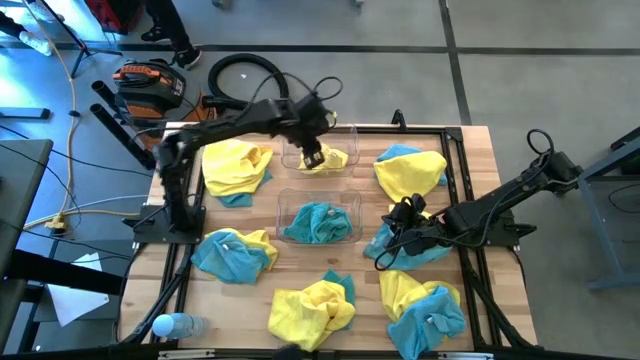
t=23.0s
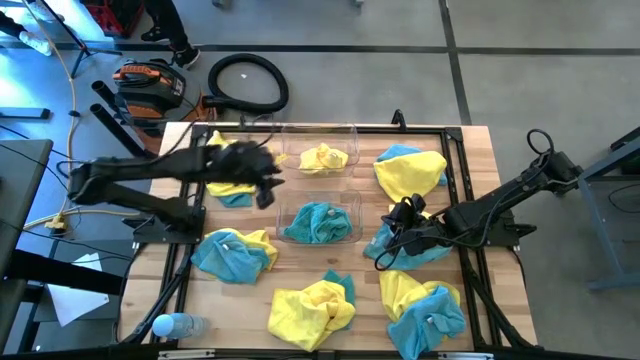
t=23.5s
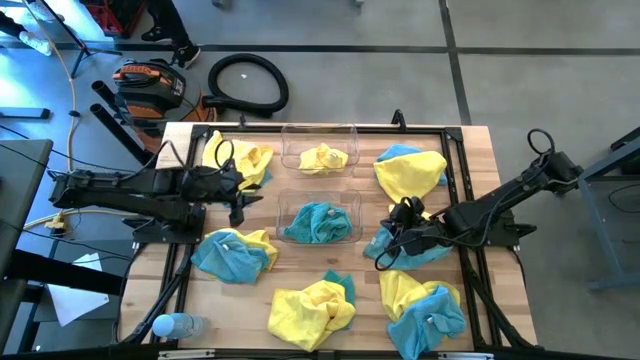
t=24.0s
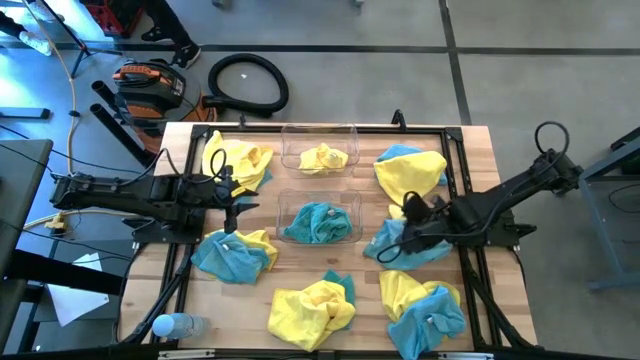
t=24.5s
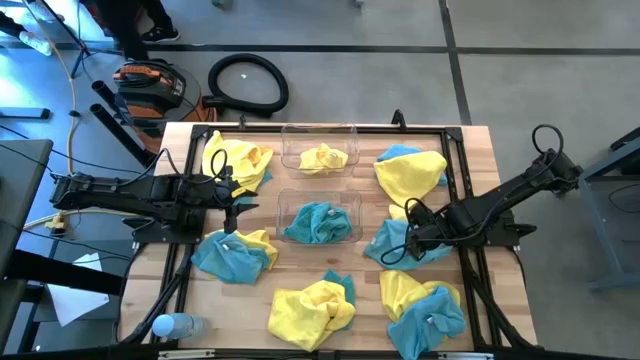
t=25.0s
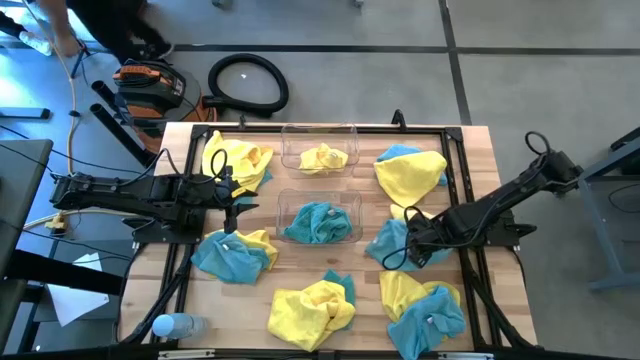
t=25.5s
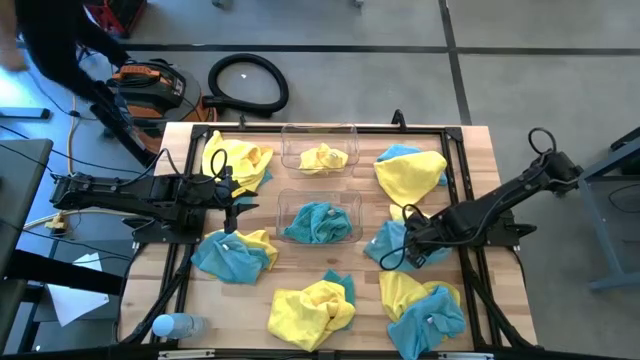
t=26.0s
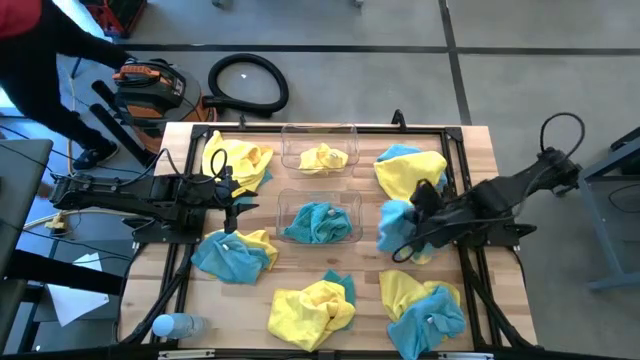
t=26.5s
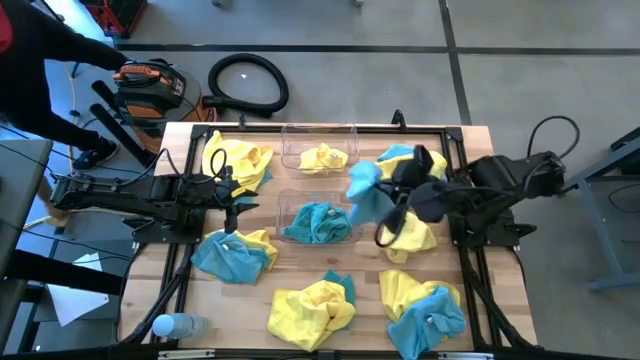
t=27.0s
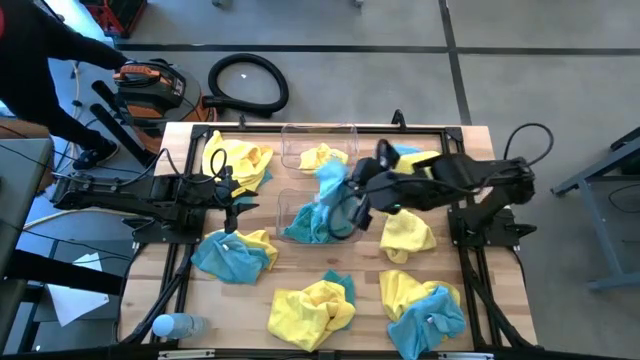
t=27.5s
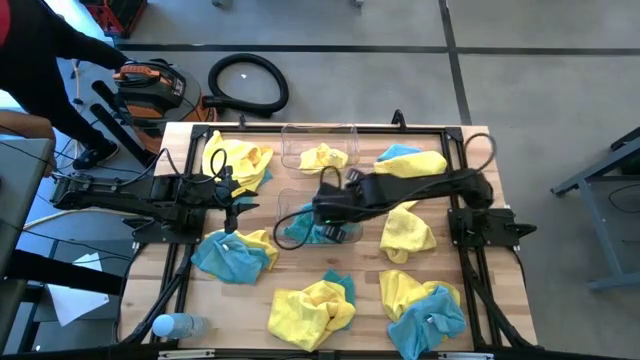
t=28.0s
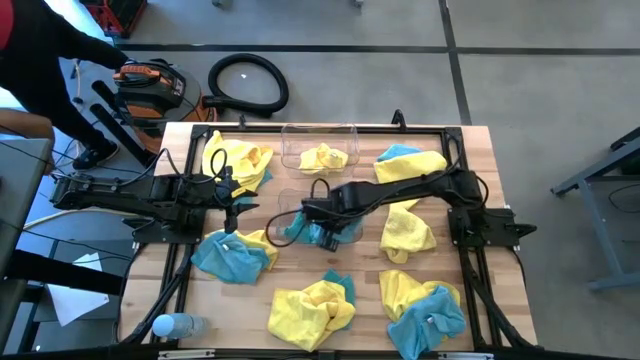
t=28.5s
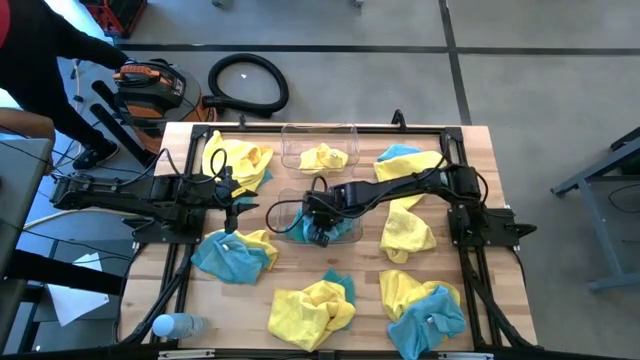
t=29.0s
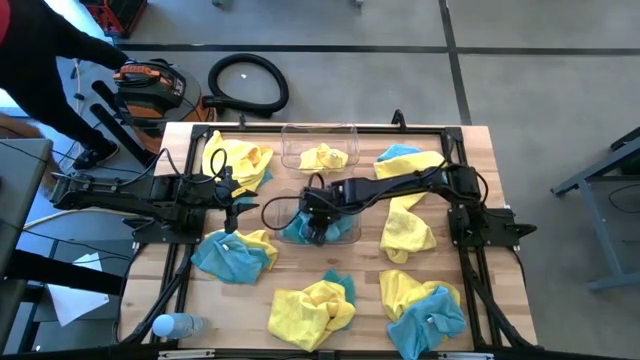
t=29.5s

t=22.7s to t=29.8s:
Task: Sort microfiber towel by color & place in baskets
Put the blue microfiber towel into the bottom transparent bin

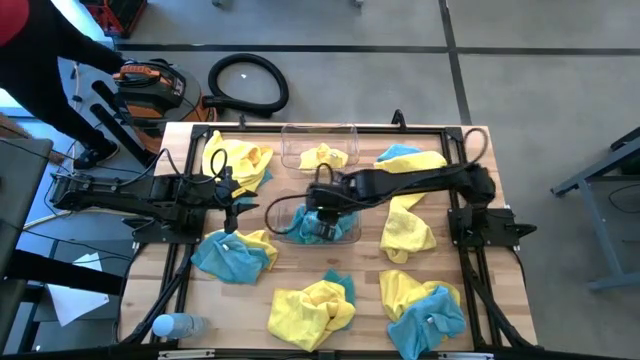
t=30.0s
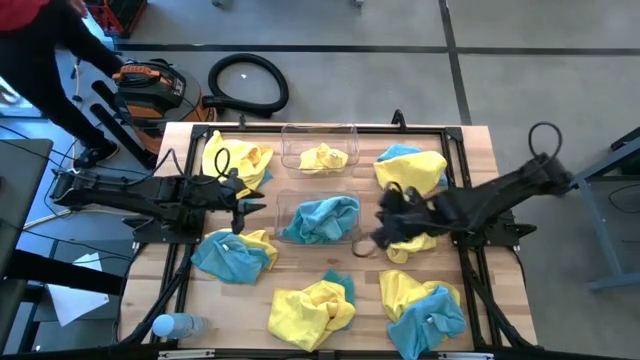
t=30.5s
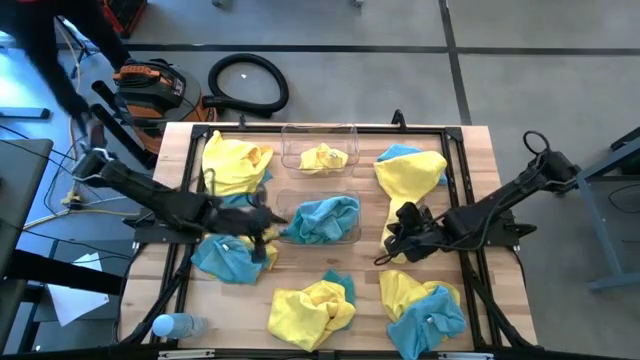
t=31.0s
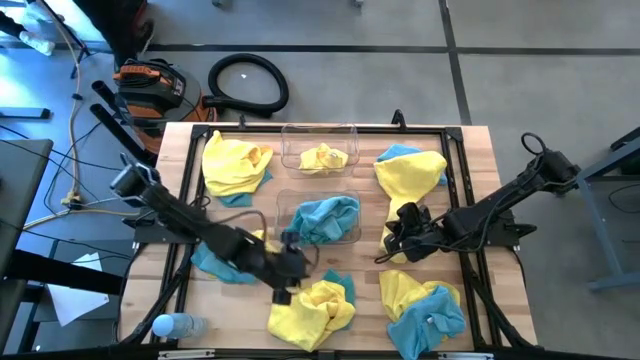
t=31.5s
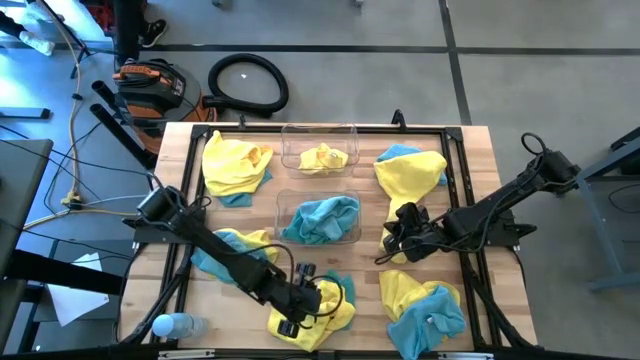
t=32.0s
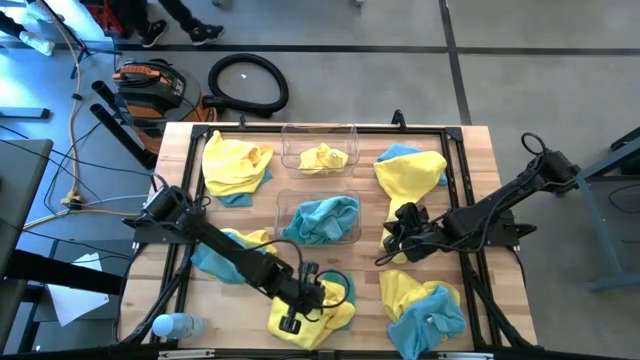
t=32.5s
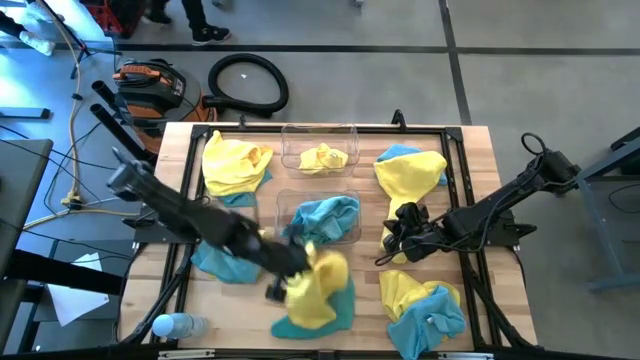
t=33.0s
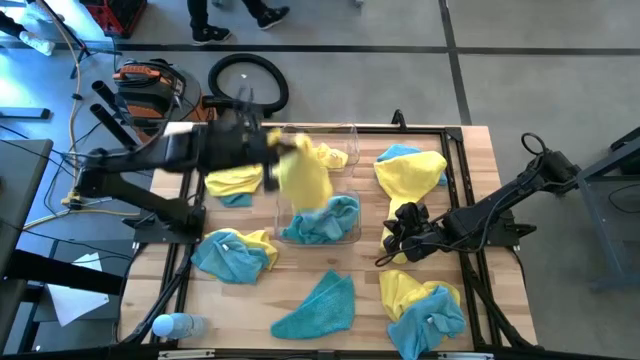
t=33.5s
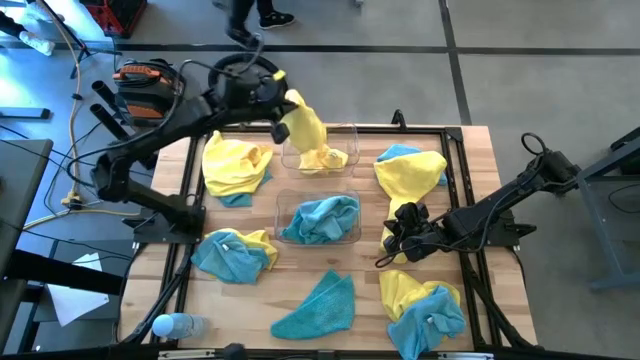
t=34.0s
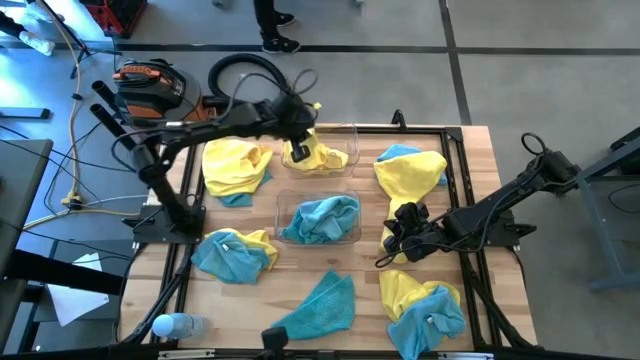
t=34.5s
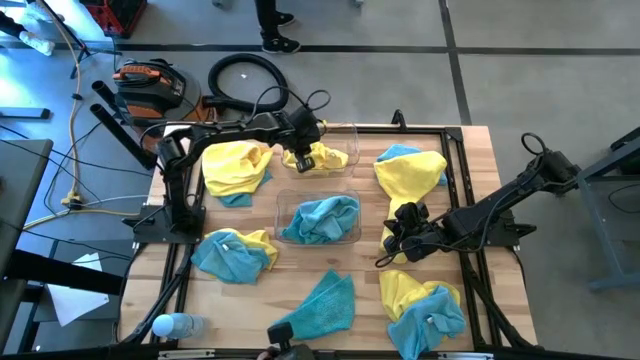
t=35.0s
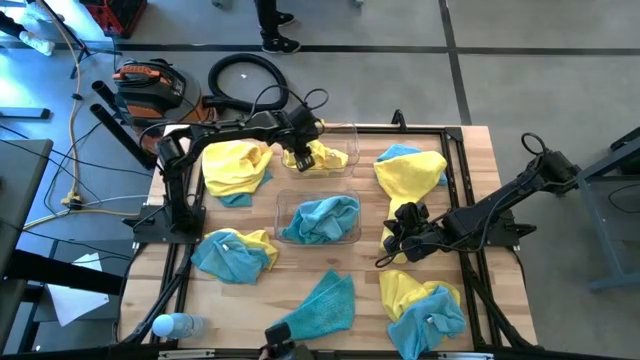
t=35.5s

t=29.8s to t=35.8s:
Put the yellow microfiber towel into the top transparent bin

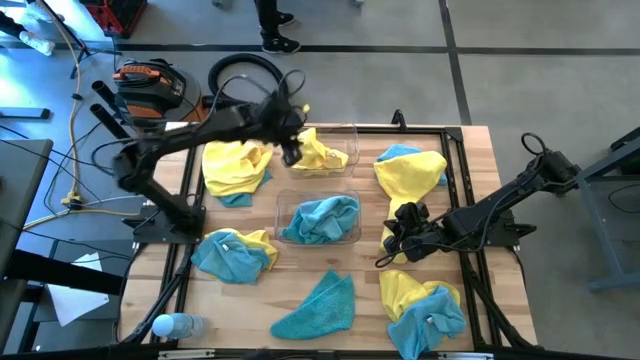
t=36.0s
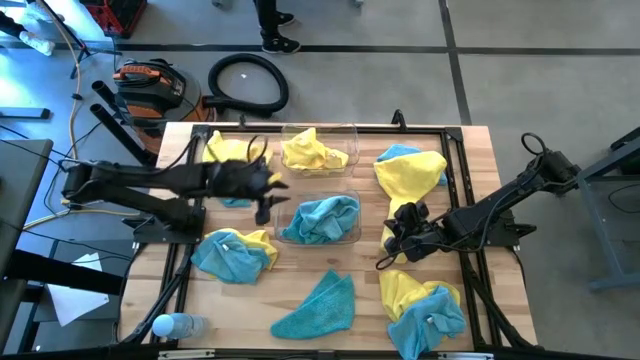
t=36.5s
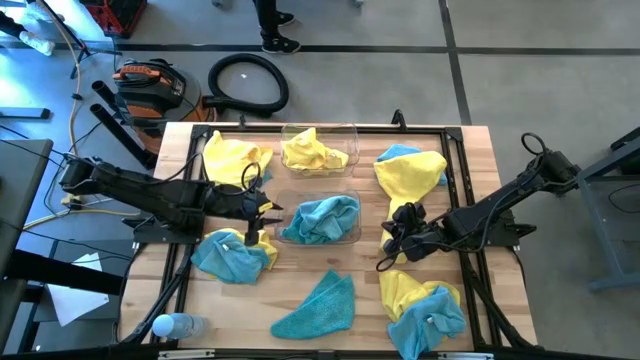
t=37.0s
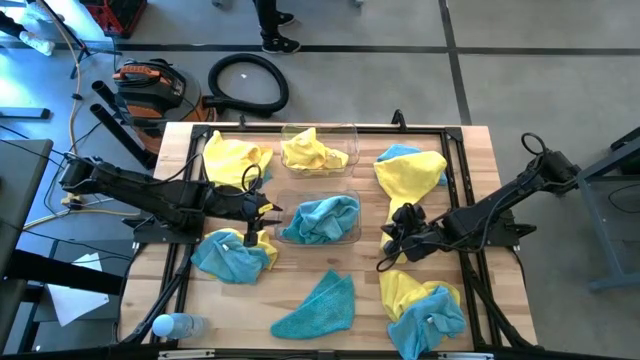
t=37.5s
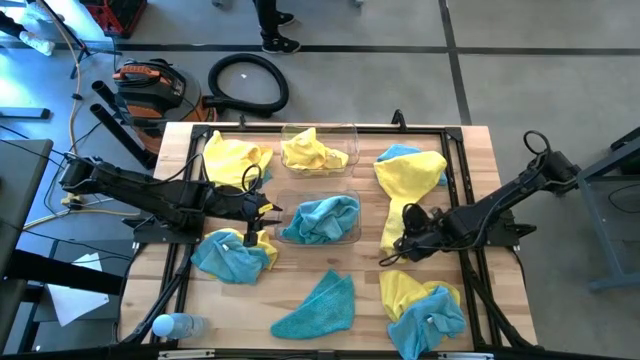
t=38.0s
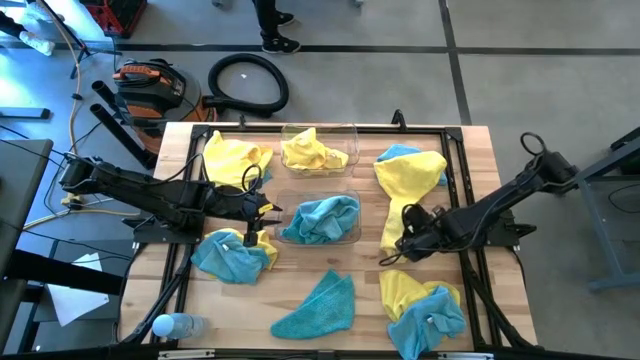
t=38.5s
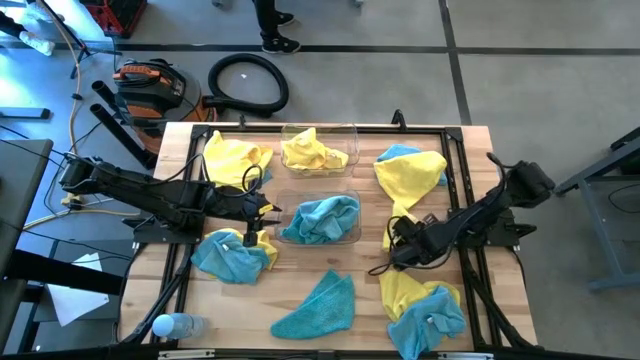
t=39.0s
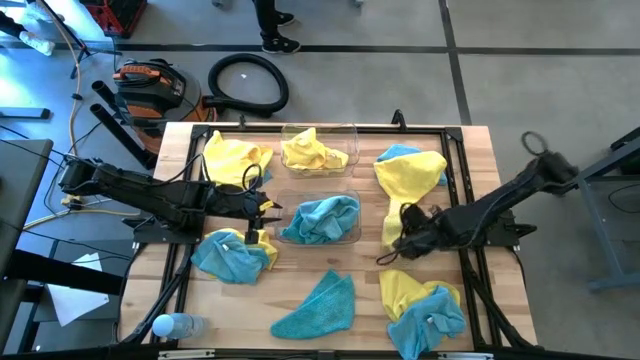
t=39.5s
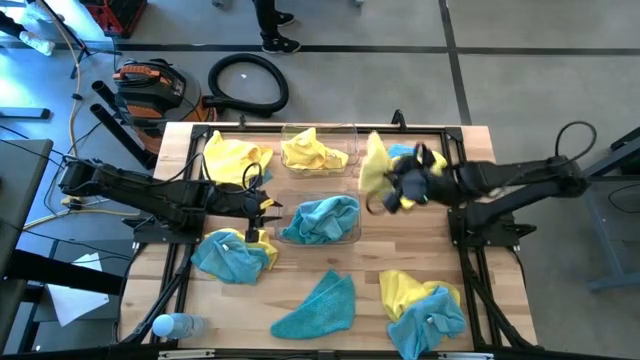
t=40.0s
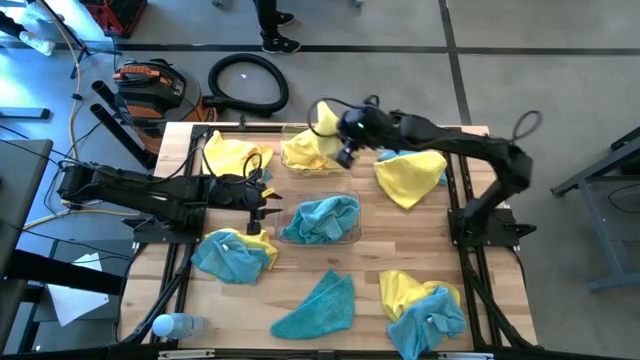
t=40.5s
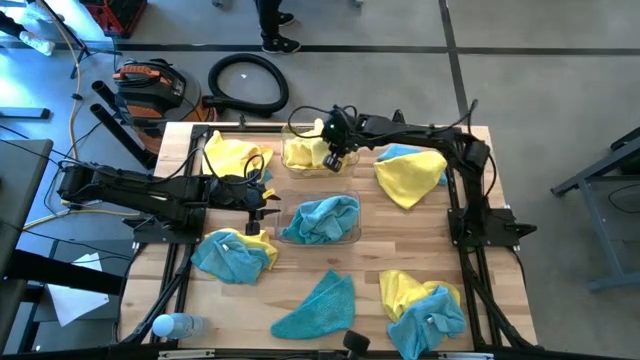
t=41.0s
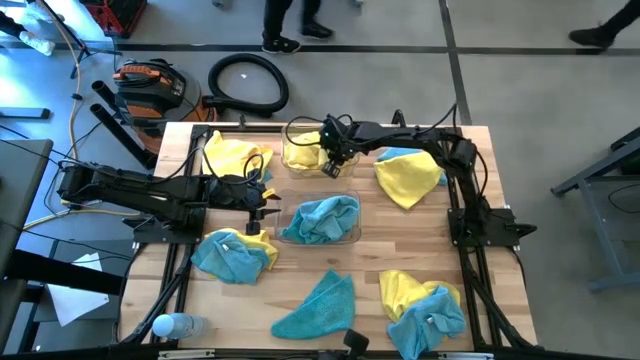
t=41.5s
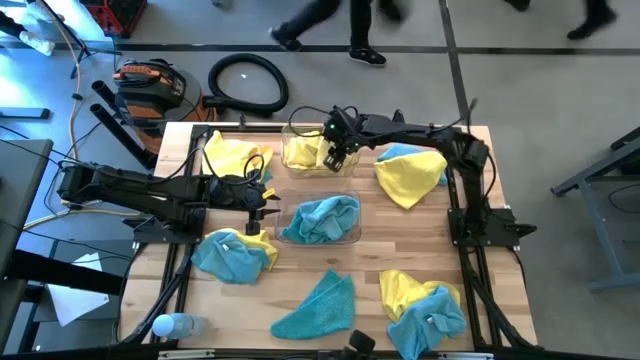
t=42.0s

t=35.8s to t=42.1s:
Put the yellow microfiber towel into the top transparent bin

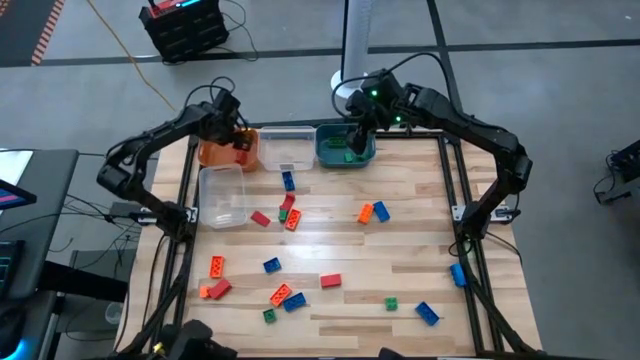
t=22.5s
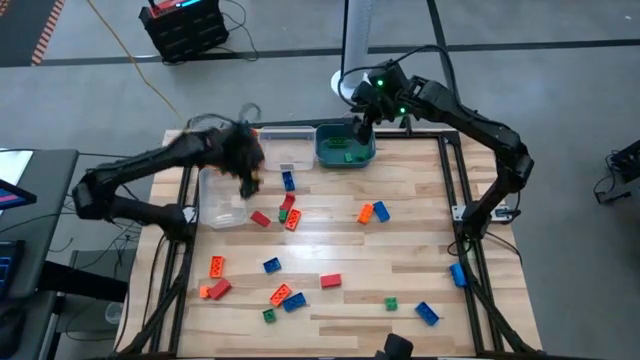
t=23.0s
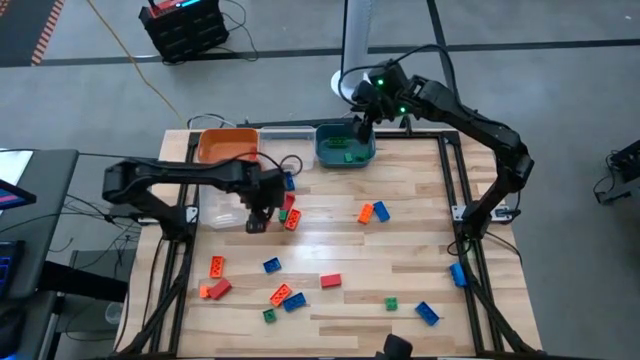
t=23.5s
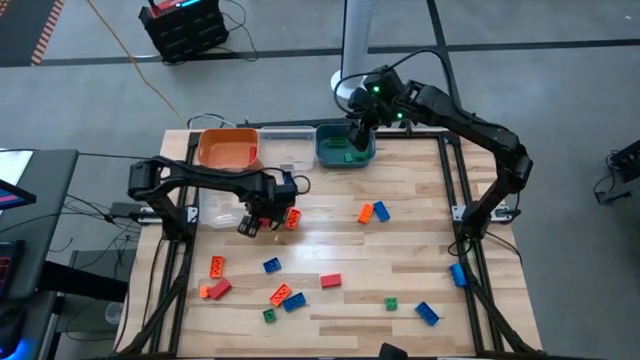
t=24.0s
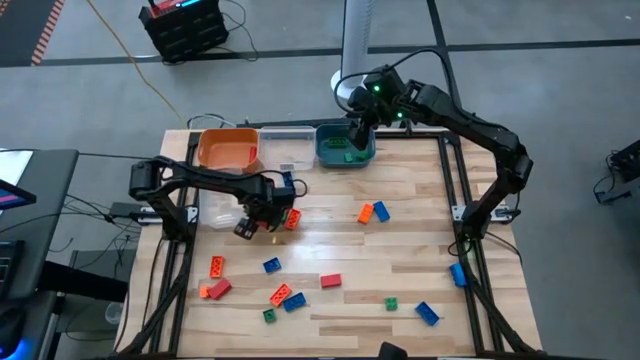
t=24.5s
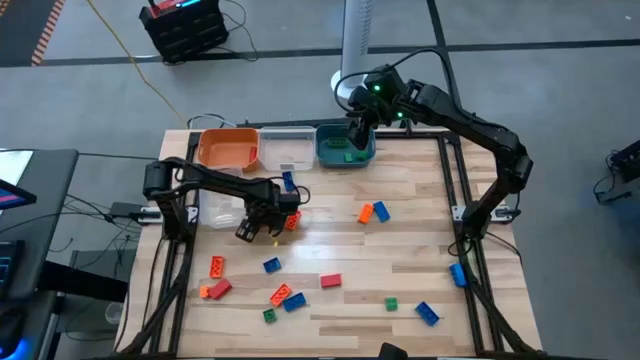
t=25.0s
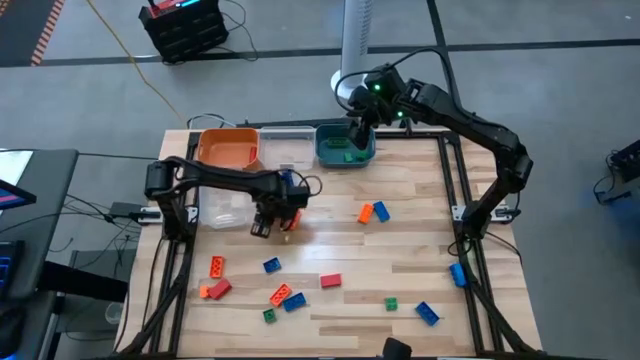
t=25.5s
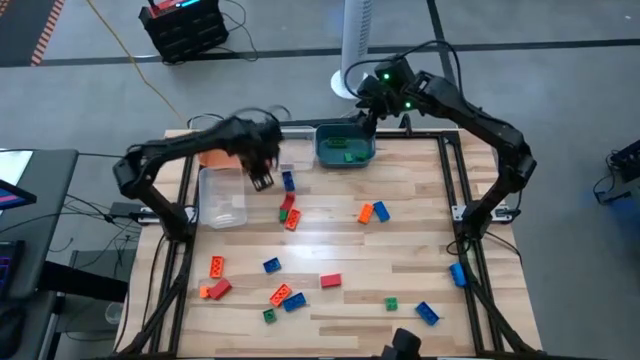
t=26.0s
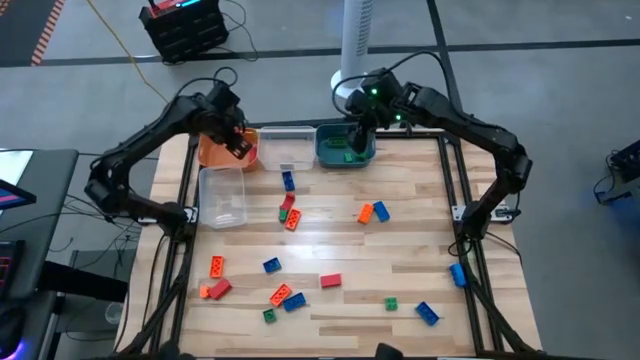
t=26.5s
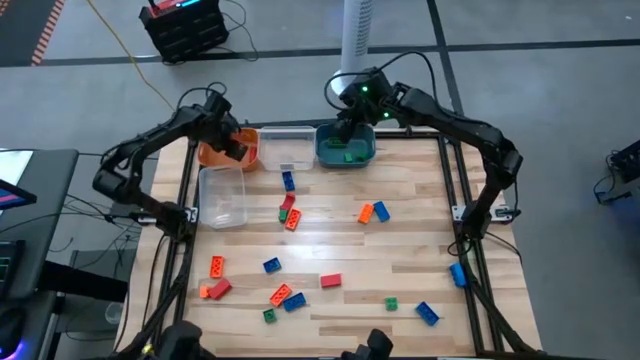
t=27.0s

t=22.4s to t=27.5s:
Task: Sort blocks
Put the red block into the orange bin
